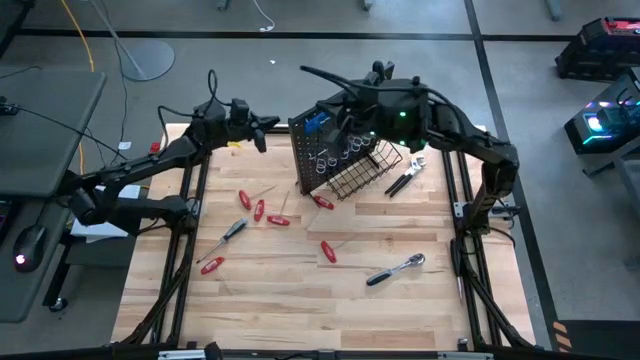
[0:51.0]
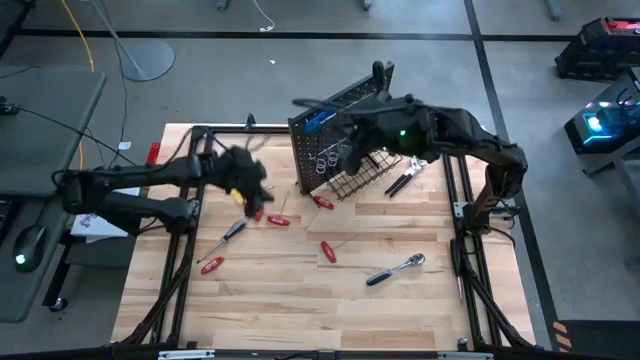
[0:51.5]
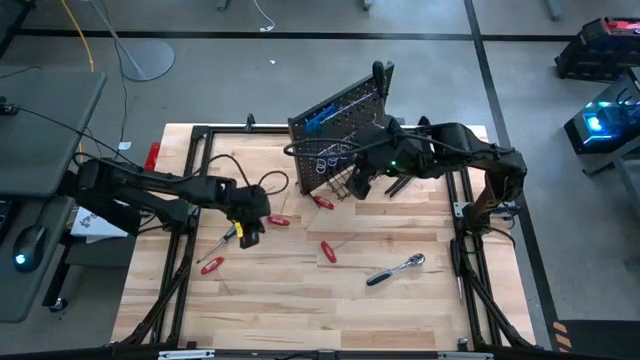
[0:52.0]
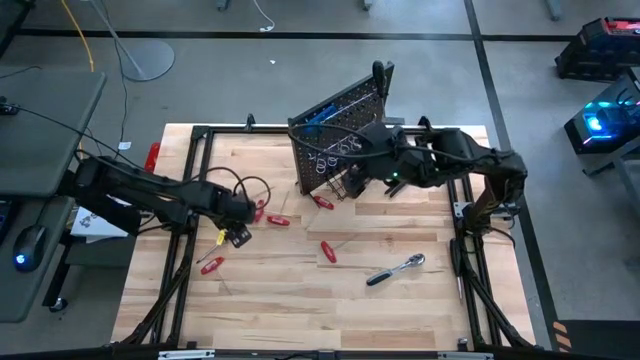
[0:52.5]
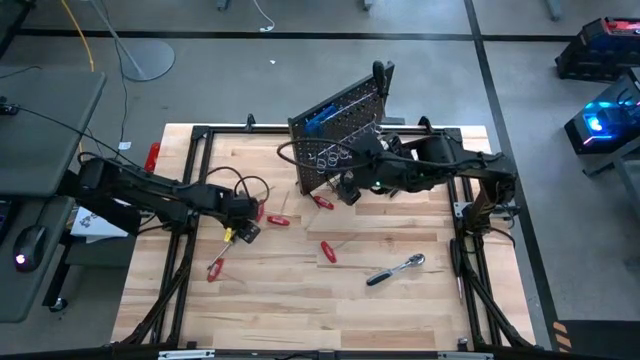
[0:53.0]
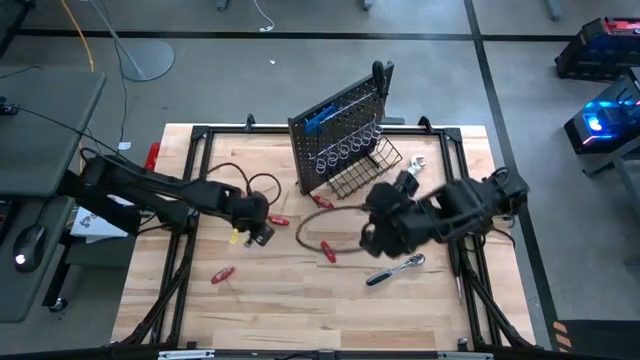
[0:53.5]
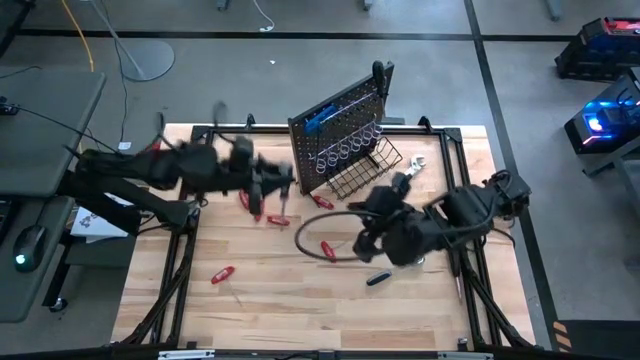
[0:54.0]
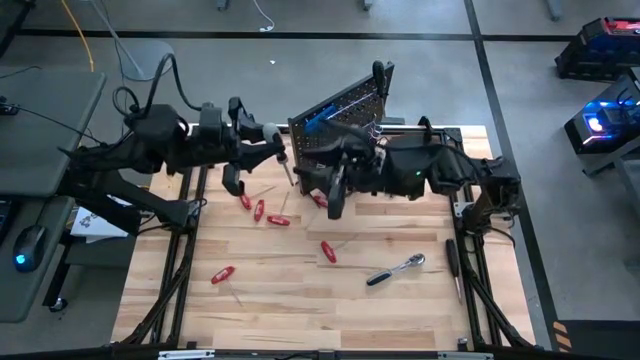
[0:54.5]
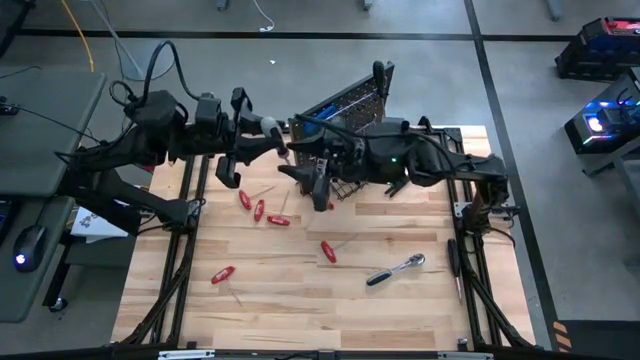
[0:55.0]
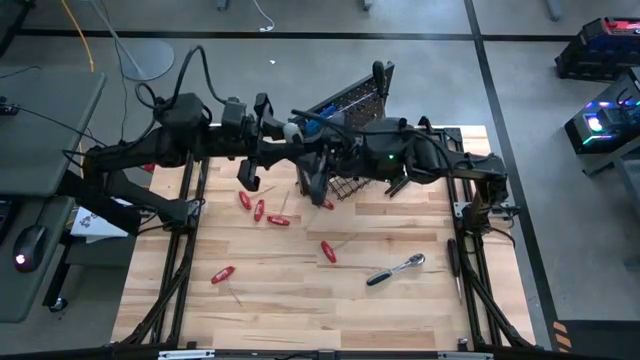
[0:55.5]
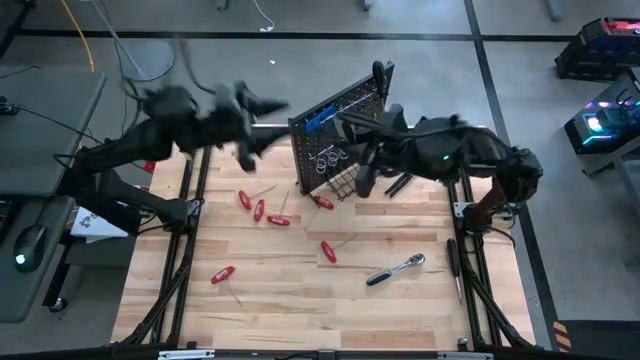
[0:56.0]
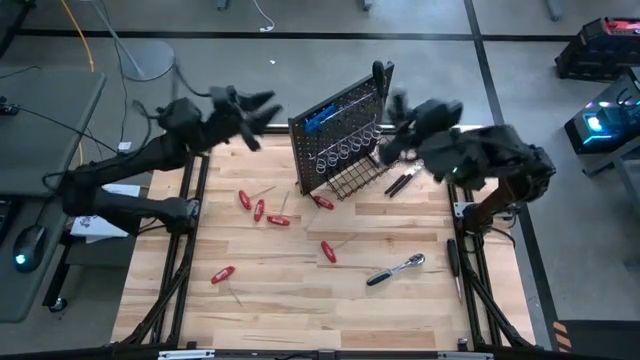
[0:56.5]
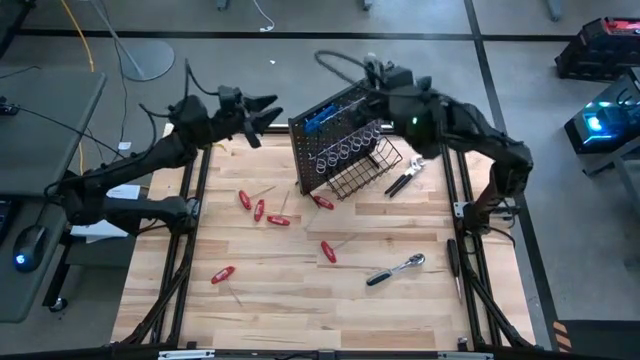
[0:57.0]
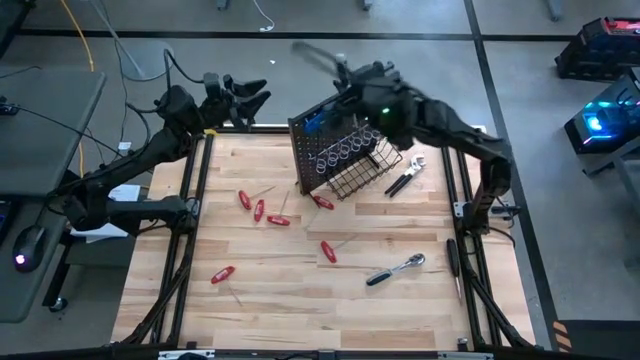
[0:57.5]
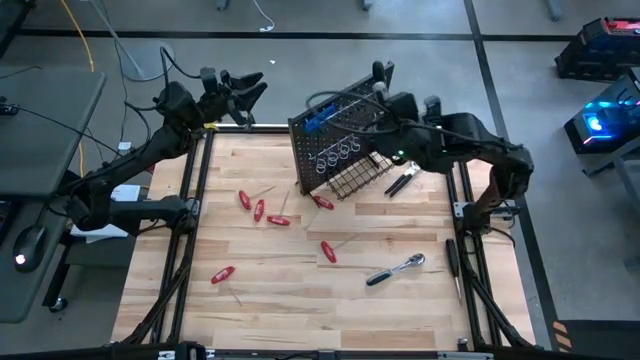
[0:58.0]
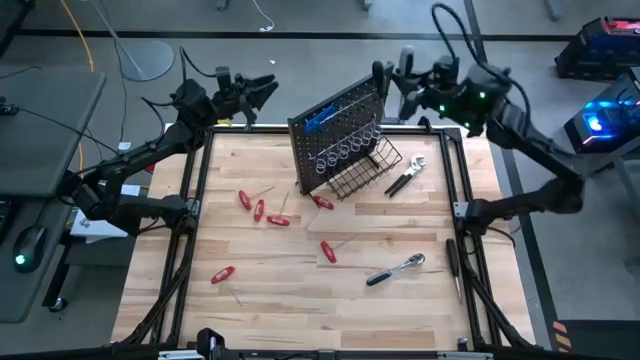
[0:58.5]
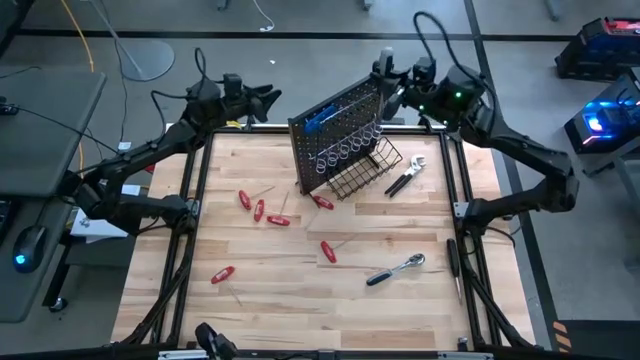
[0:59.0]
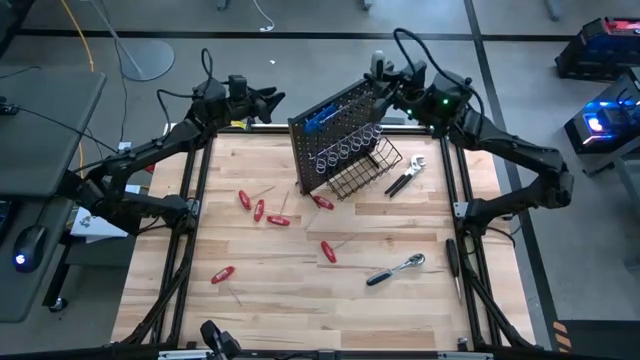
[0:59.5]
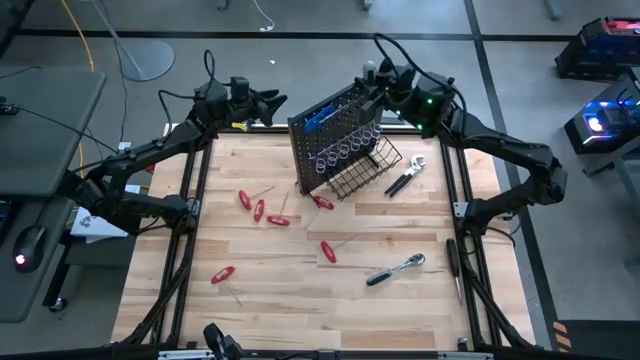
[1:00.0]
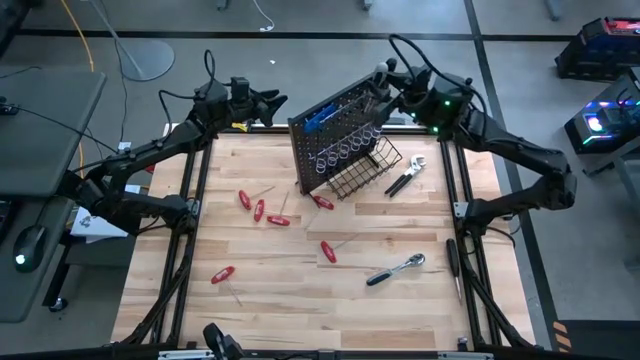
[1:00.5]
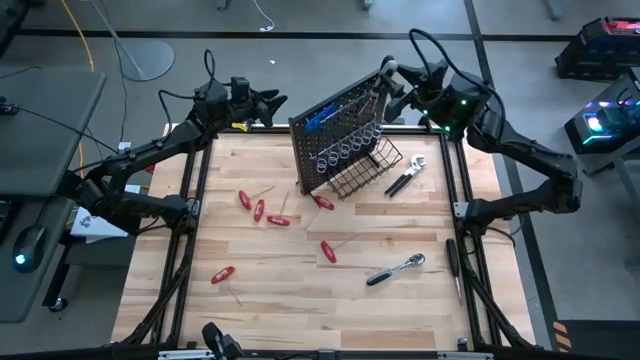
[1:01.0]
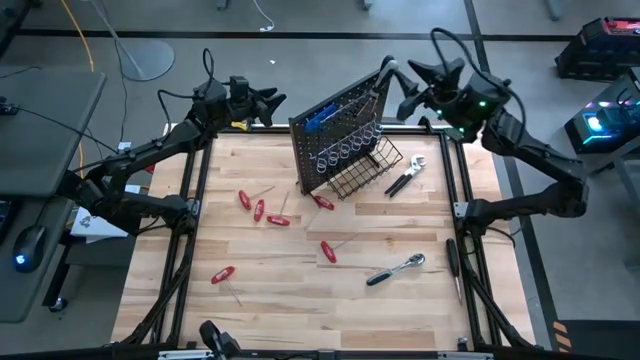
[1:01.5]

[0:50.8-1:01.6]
Task: Hang tools onto peg board
Hang the gray screwdriver on the peg board

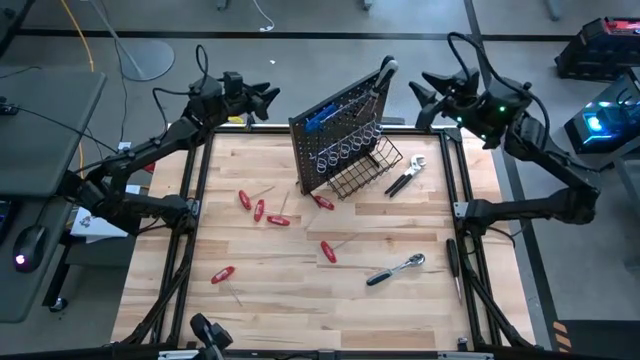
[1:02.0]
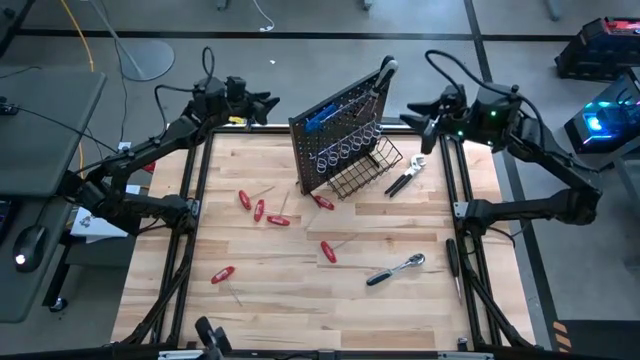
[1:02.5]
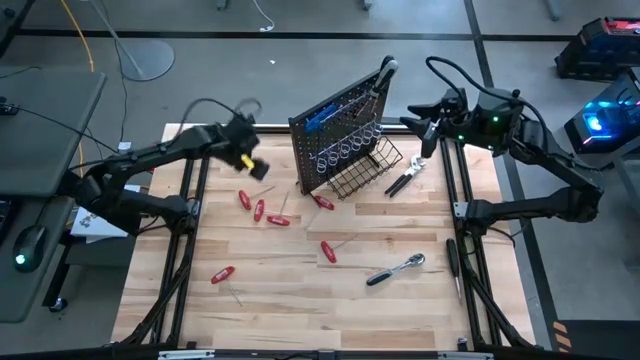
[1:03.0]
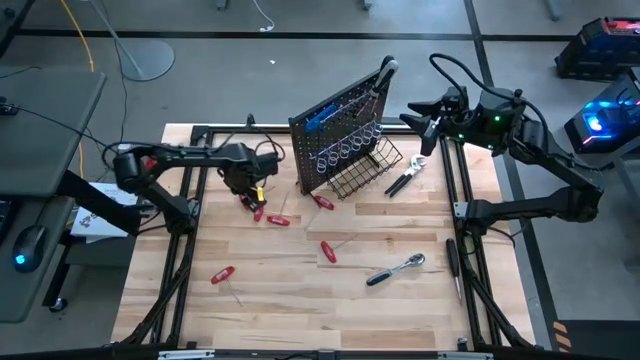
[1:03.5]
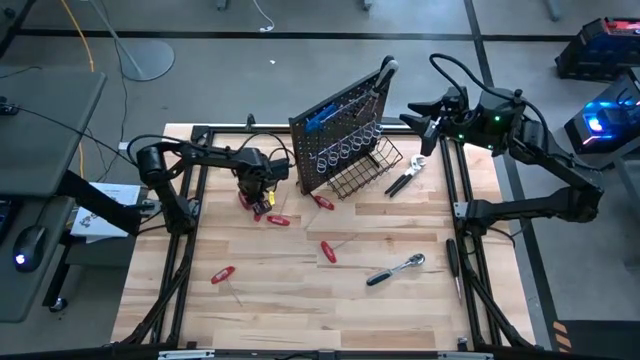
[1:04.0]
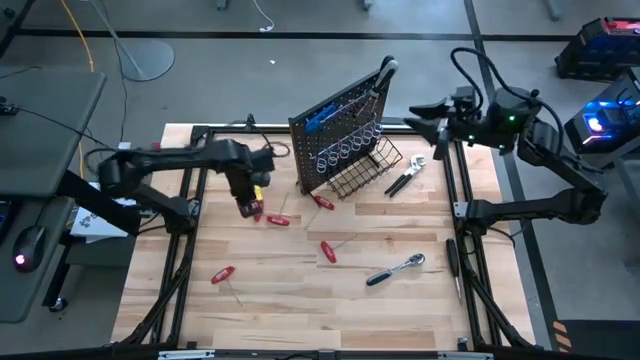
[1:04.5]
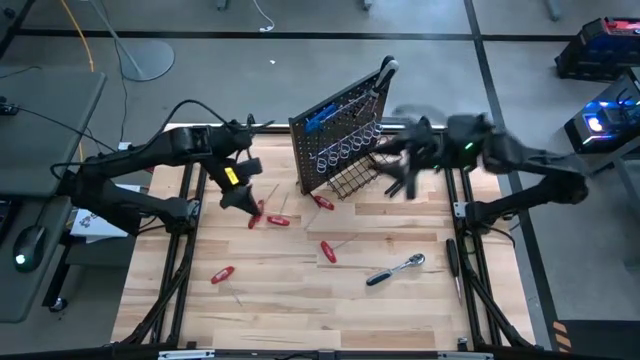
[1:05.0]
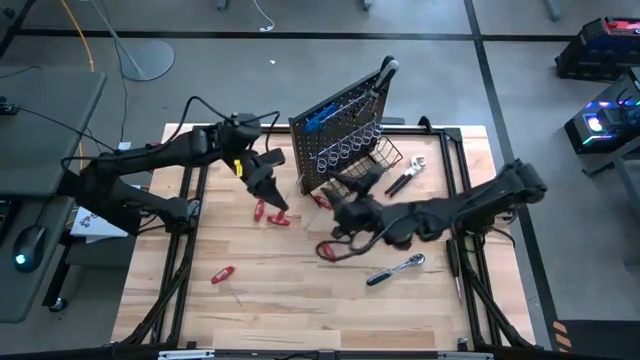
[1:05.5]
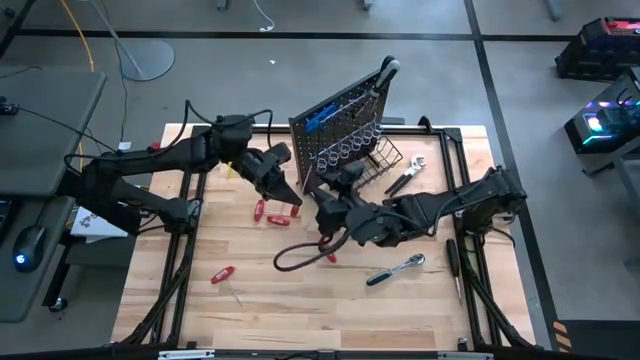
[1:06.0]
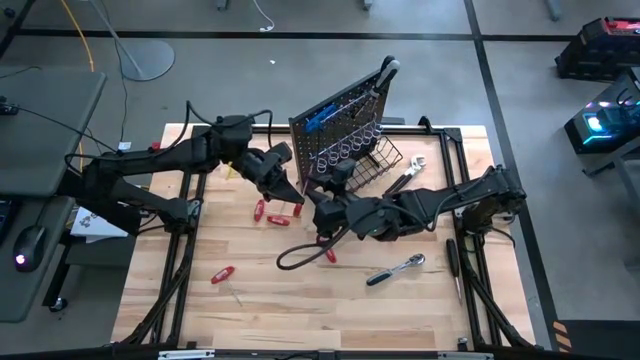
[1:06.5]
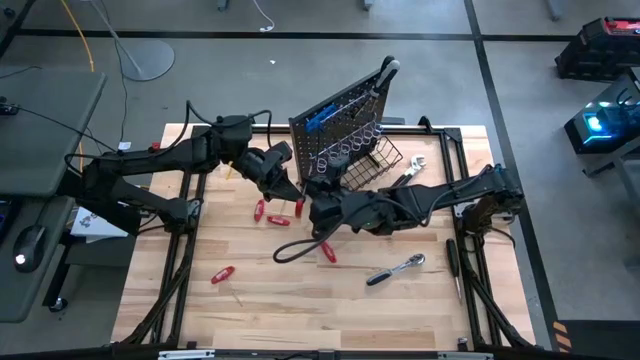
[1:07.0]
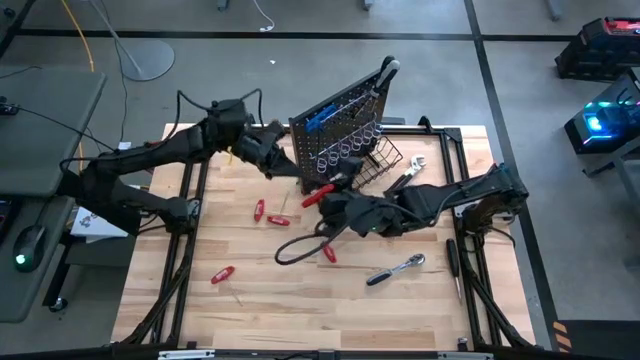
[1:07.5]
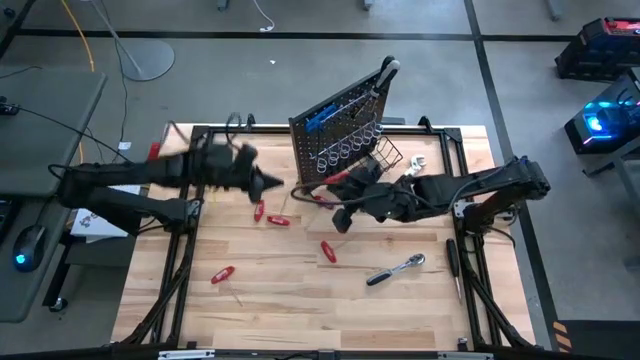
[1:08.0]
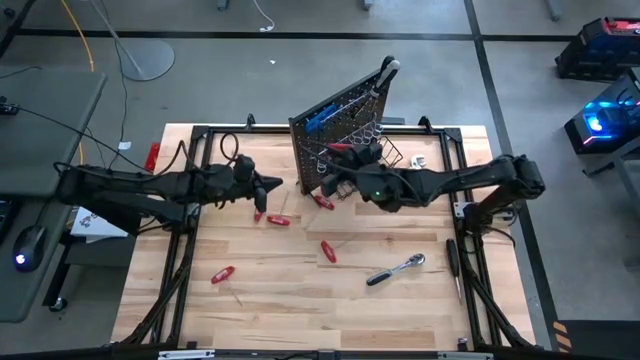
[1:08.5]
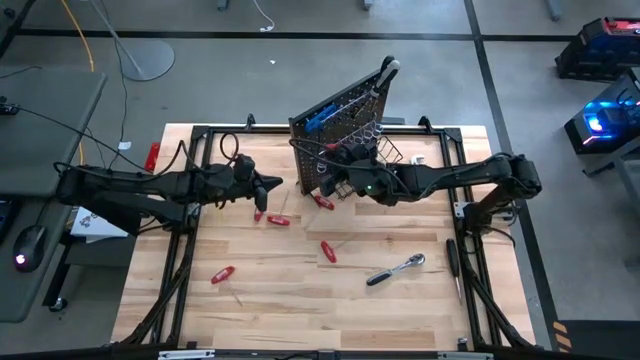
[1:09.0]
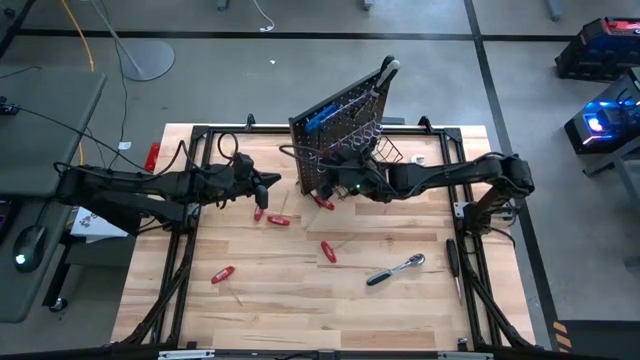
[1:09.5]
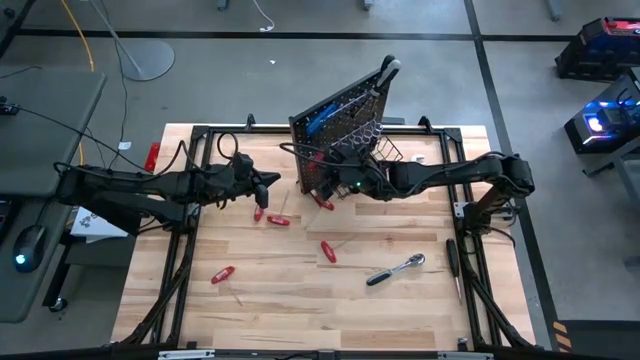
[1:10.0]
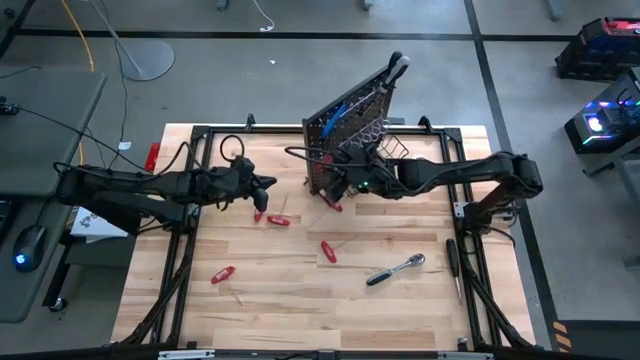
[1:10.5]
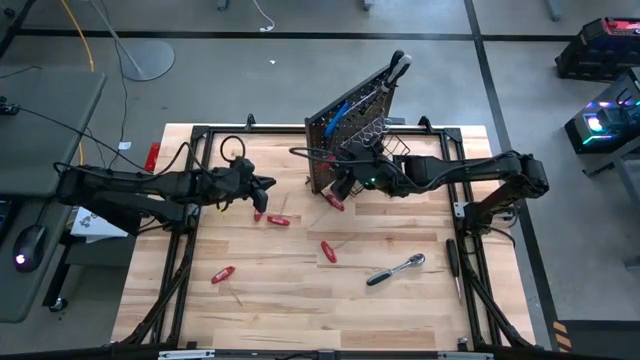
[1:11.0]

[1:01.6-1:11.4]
Hang the red allen wrench on the peg board

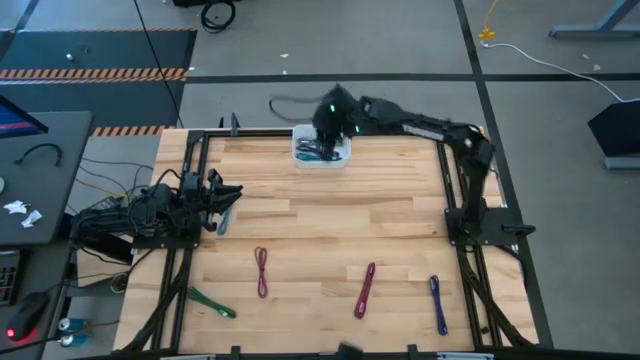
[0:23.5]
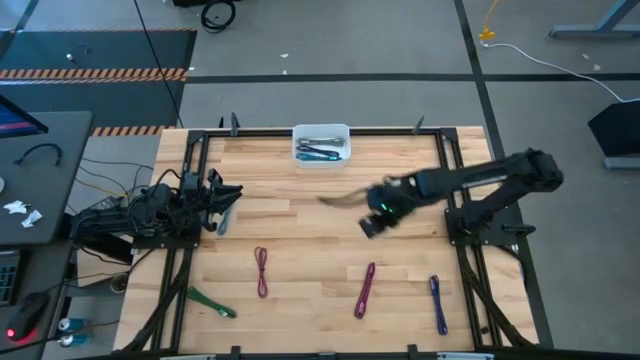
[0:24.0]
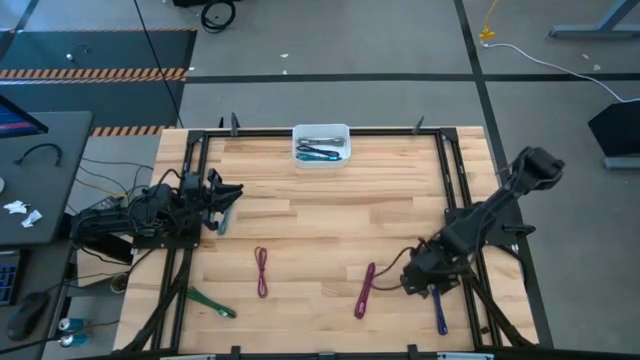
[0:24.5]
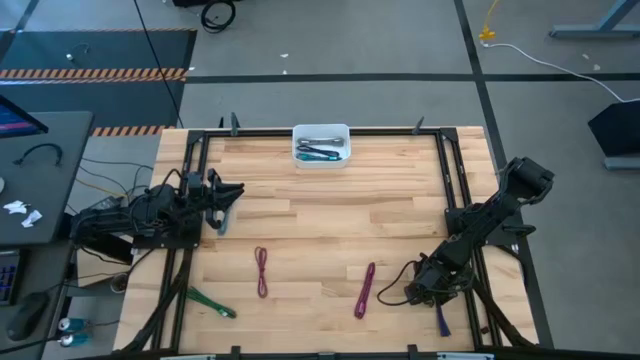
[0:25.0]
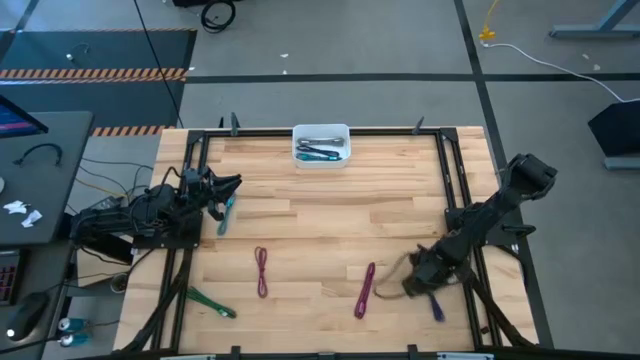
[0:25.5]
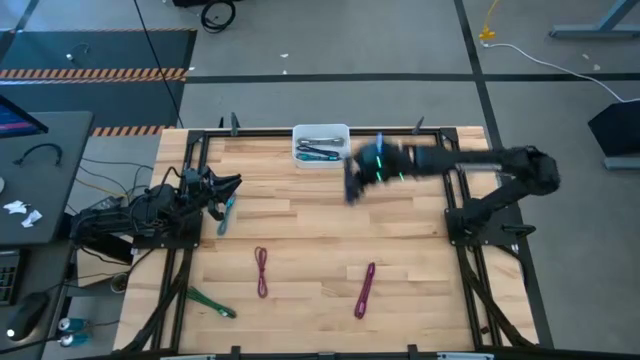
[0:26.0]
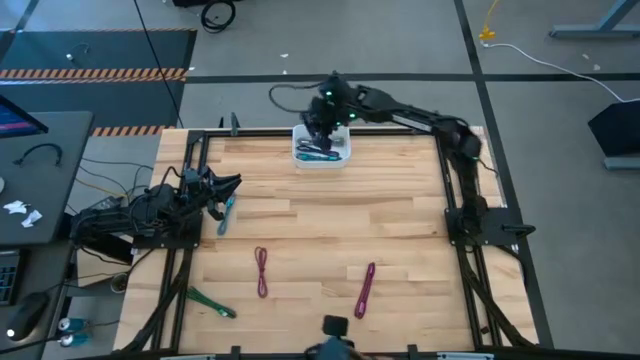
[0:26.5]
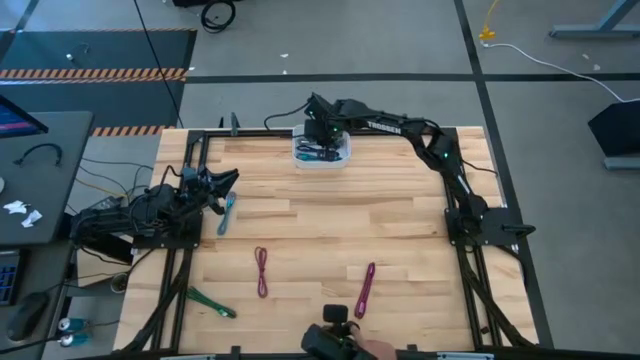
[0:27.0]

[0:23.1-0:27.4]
Task: Pick and place USB-C Cables
Put the violet charger cable into the white bin
